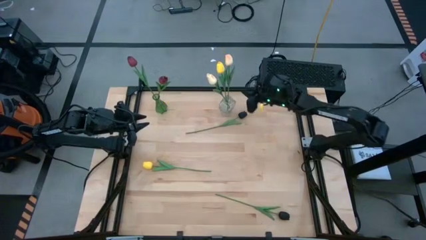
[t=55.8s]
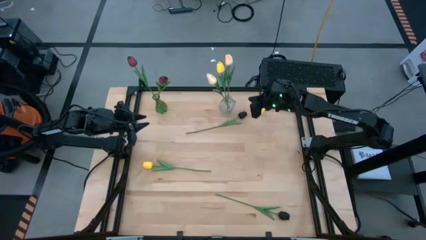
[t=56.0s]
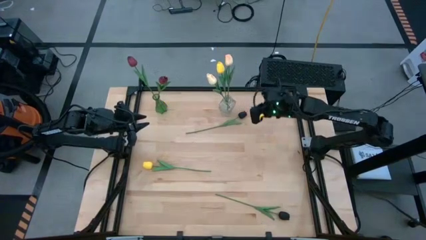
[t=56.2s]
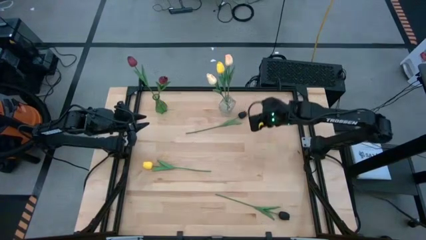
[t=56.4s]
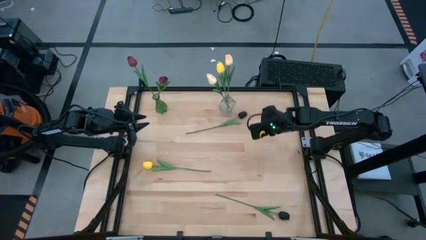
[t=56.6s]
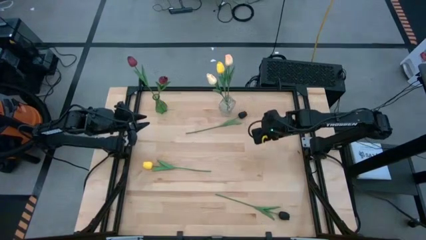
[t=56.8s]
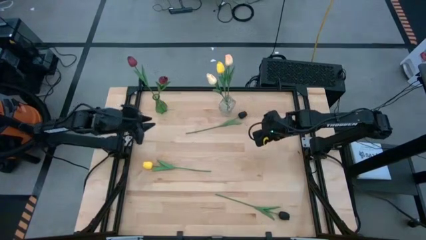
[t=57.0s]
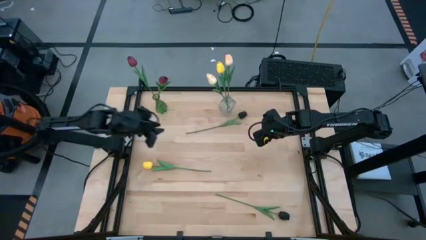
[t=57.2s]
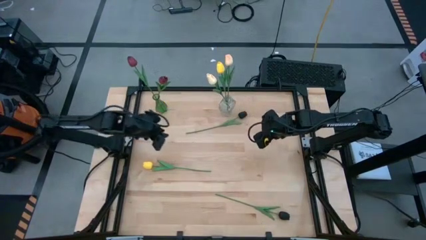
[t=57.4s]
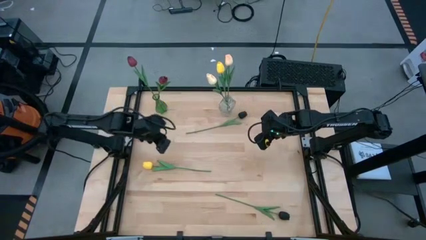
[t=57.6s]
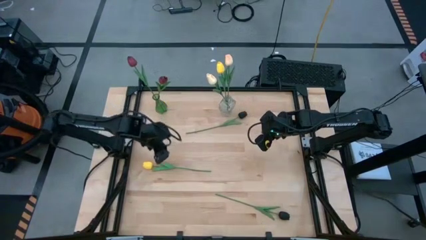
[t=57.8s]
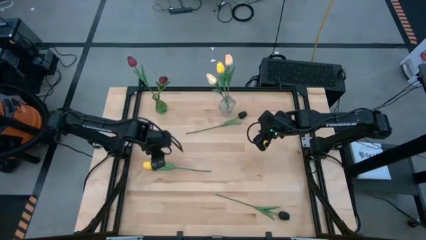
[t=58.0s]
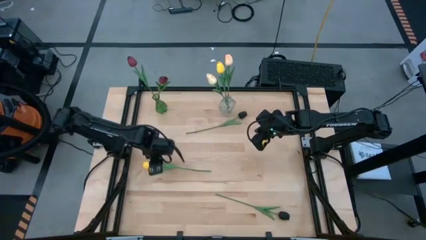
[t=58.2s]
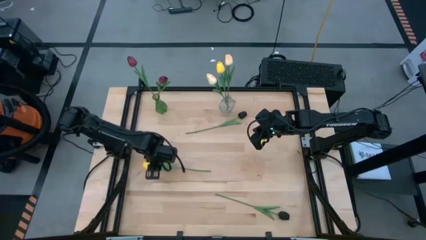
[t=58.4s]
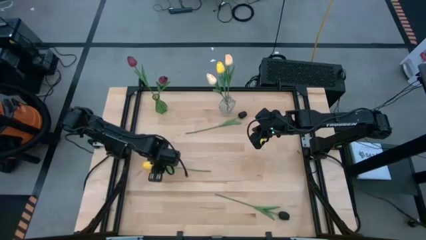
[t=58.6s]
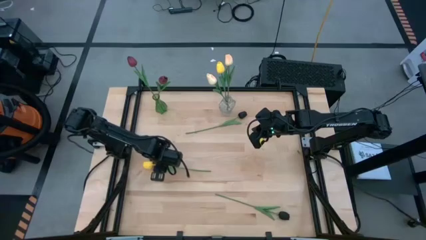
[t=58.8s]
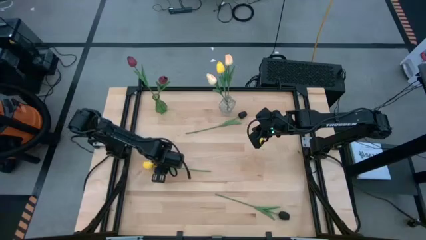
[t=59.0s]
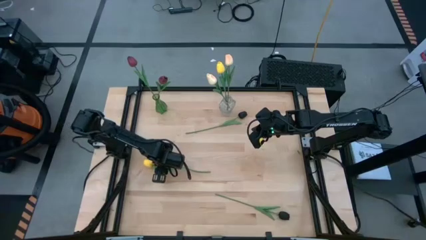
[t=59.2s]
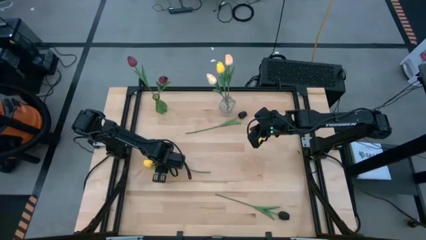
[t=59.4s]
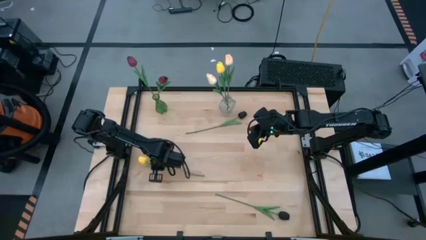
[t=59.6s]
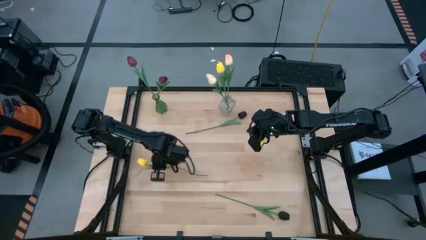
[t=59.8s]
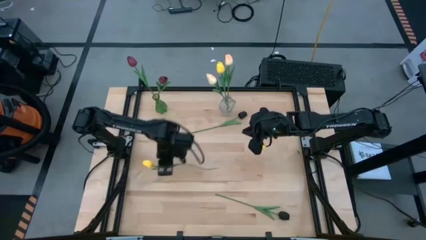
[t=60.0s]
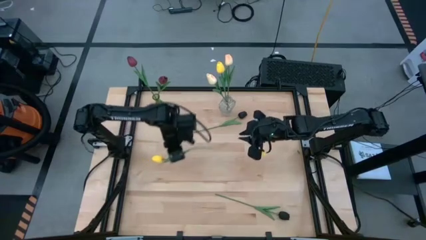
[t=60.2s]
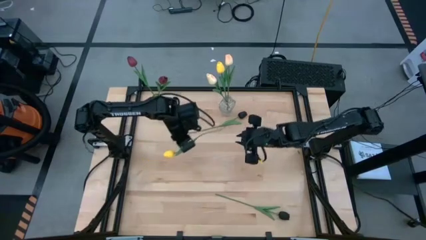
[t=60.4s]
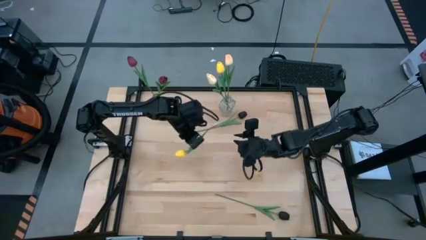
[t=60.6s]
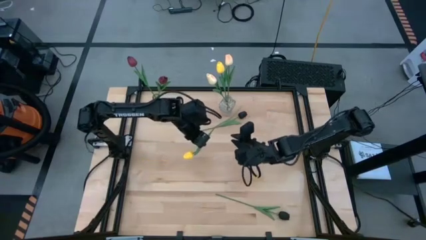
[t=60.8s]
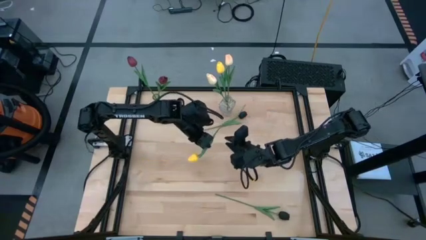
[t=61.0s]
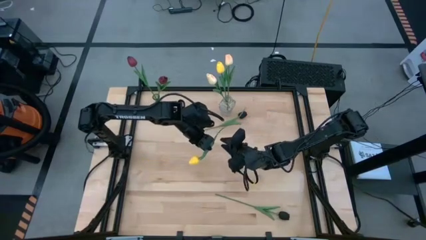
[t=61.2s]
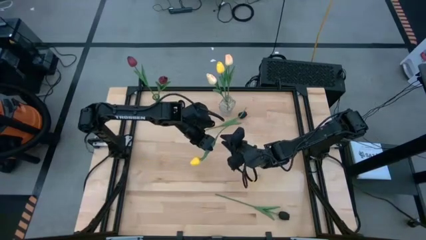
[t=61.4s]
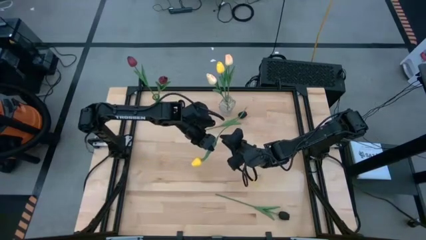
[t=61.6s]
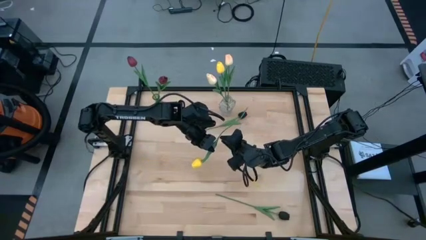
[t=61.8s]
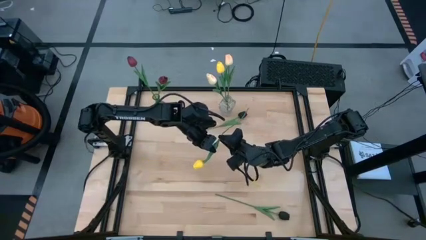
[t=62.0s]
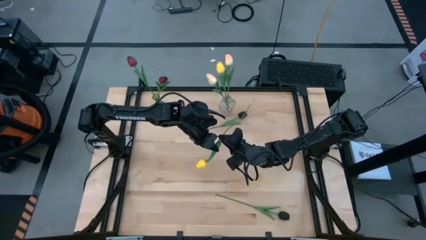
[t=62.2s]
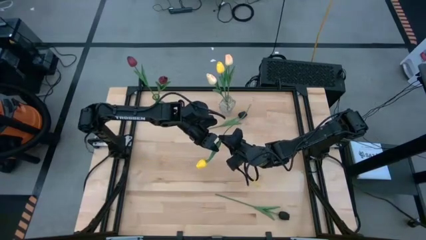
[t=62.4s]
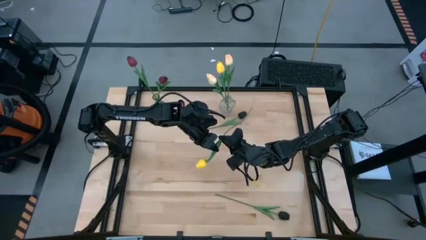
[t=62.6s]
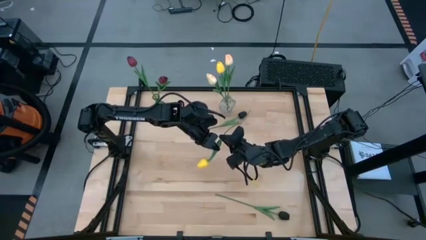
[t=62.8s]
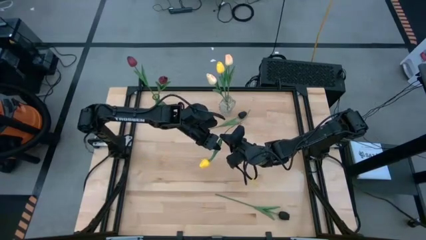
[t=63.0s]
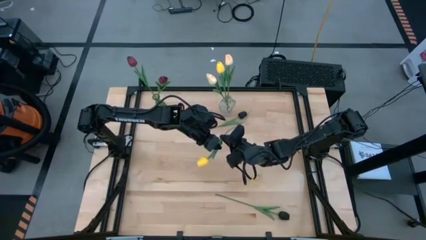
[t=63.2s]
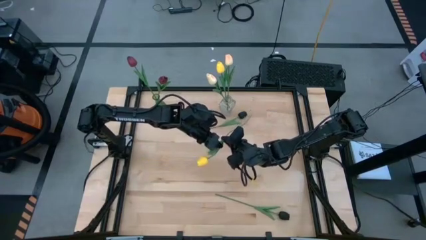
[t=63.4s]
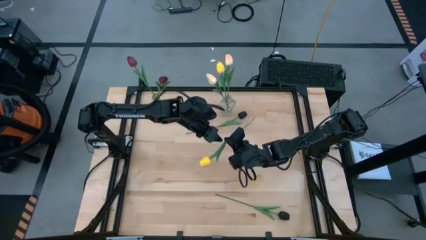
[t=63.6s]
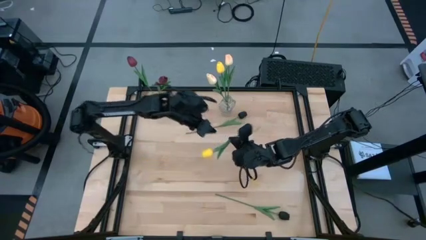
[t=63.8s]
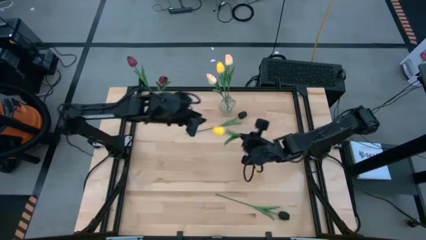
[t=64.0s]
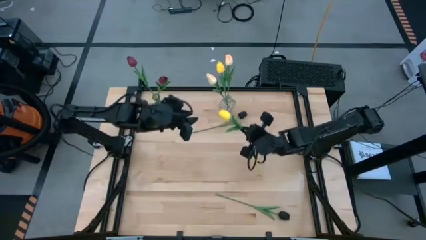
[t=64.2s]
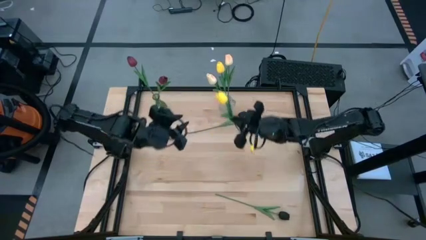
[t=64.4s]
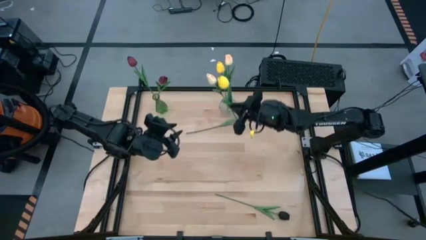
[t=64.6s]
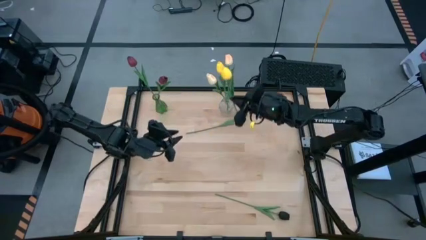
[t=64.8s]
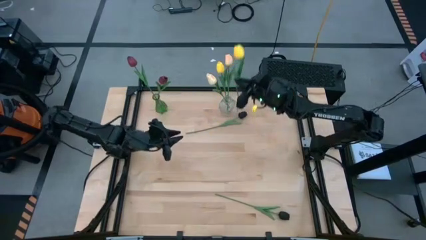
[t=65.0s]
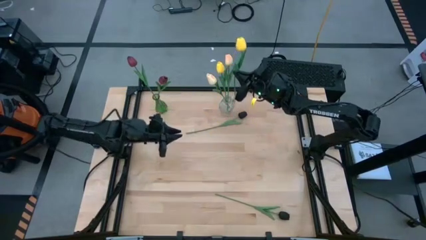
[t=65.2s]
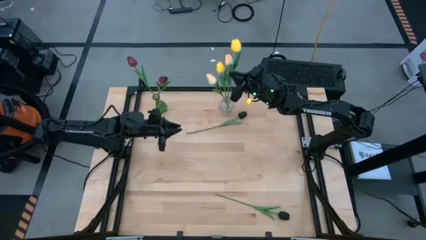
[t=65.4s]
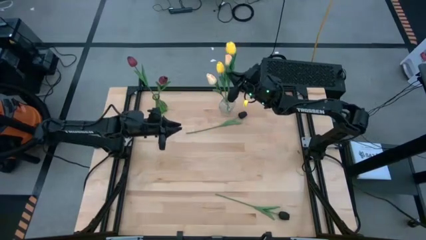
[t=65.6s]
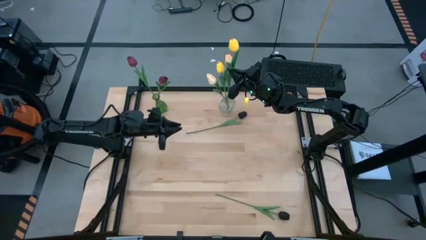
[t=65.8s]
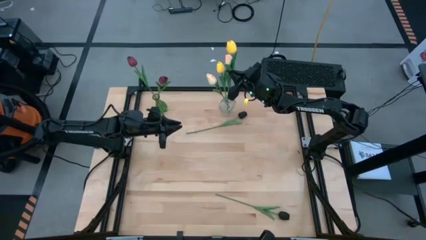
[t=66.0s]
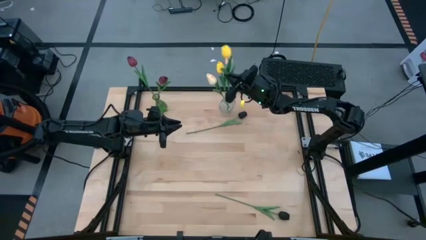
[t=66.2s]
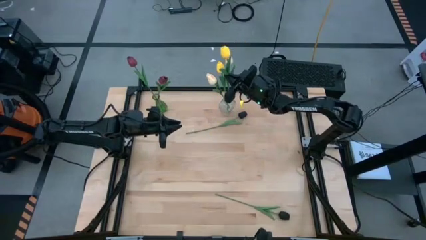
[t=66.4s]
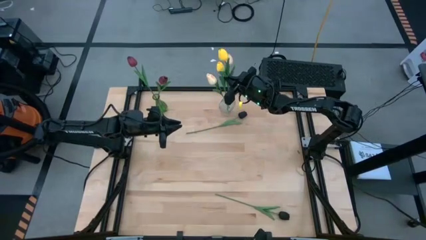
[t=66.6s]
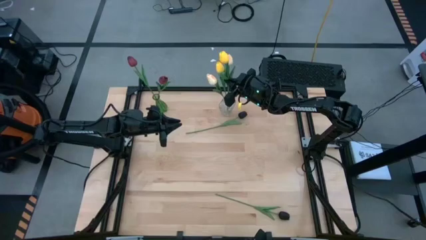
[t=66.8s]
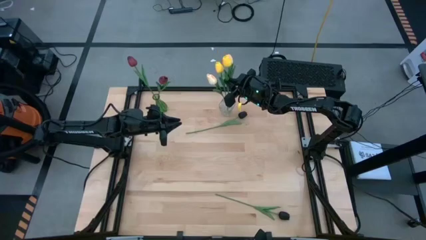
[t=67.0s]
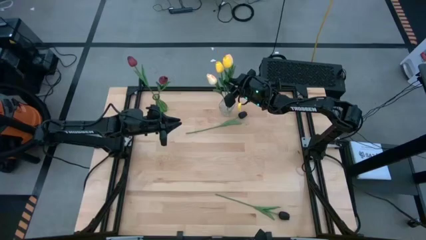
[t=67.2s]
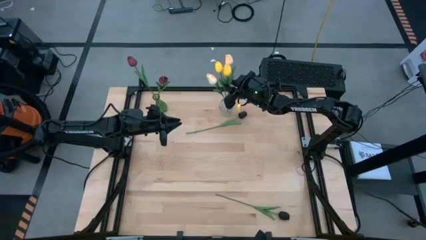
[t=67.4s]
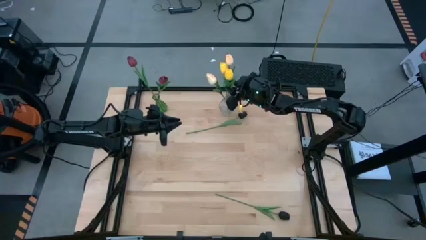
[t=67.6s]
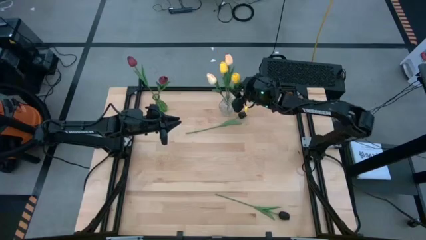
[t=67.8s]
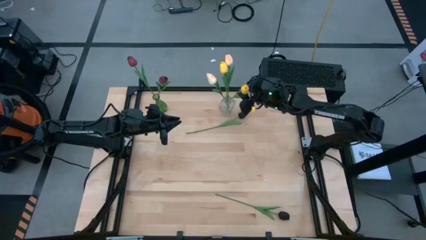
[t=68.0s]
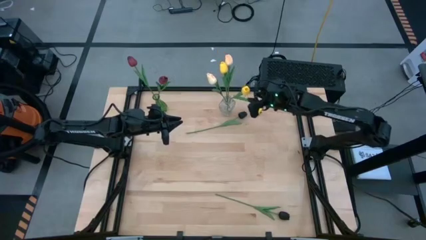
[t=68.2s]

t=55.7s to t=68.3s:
Task: Sort flowers into vase by color
Put the yellow tulip into the transparent vase

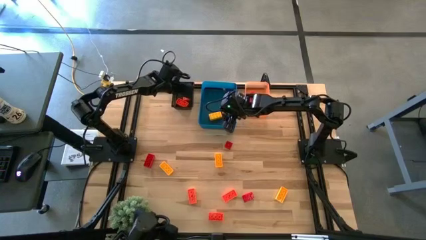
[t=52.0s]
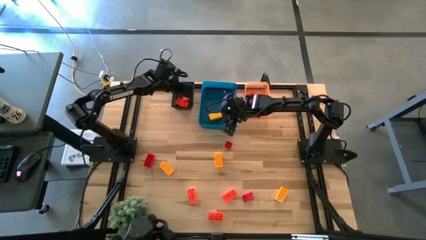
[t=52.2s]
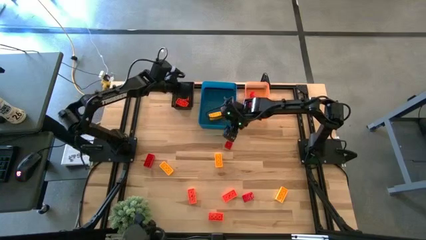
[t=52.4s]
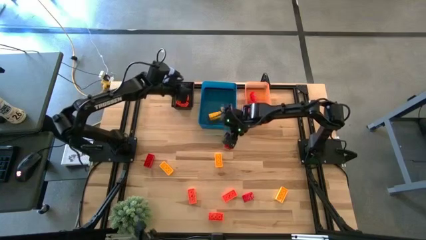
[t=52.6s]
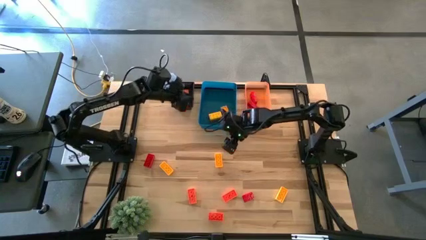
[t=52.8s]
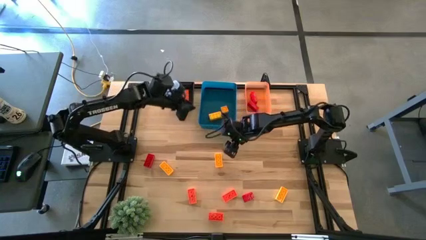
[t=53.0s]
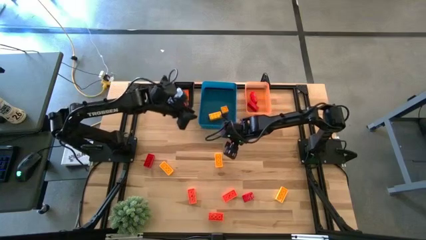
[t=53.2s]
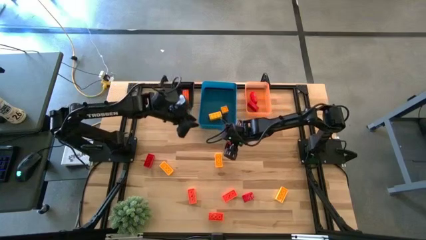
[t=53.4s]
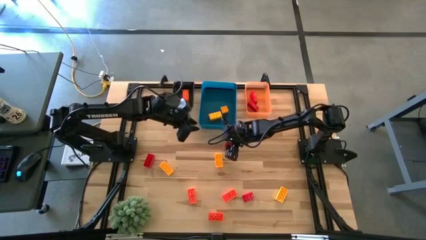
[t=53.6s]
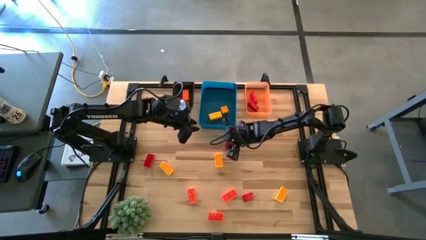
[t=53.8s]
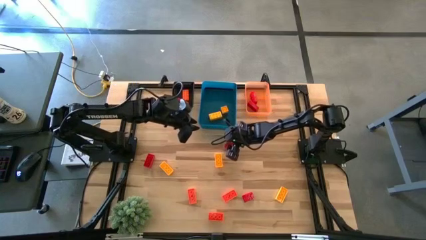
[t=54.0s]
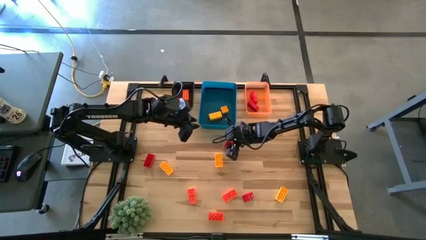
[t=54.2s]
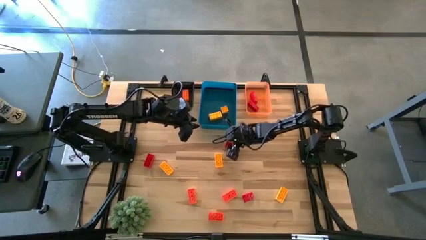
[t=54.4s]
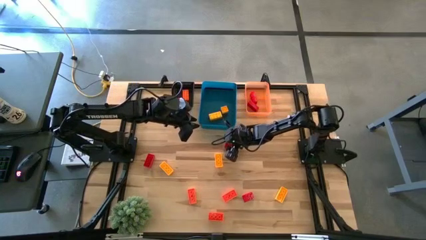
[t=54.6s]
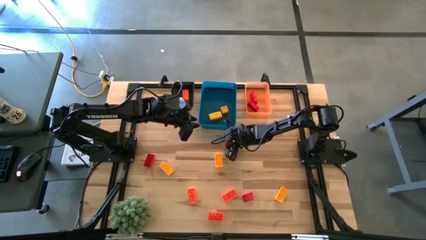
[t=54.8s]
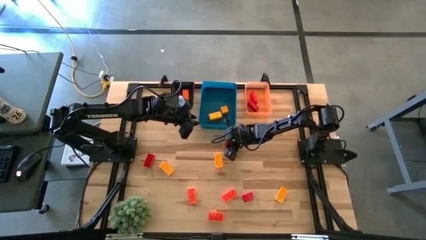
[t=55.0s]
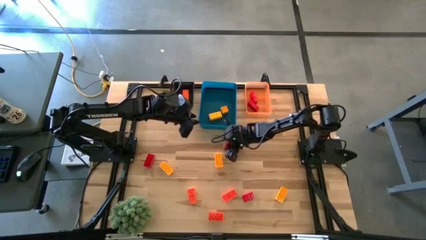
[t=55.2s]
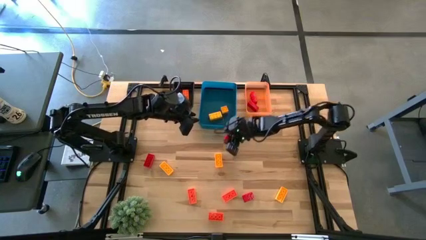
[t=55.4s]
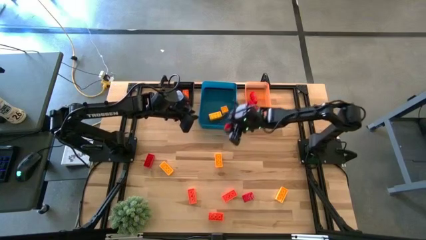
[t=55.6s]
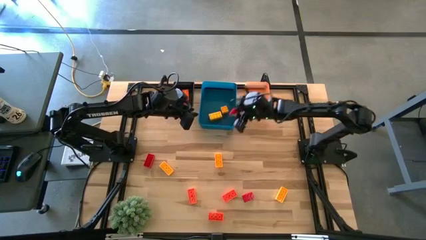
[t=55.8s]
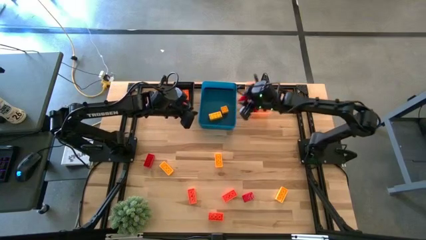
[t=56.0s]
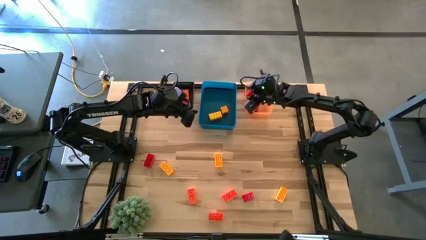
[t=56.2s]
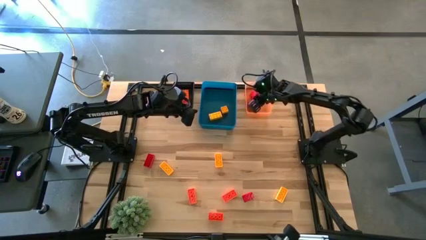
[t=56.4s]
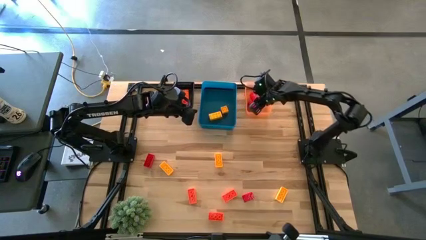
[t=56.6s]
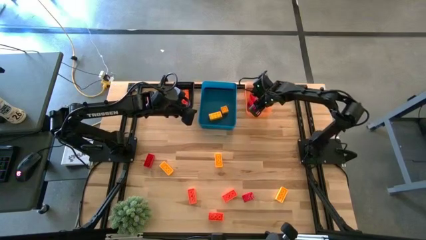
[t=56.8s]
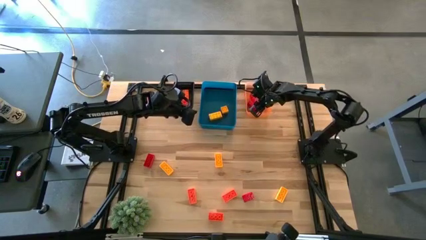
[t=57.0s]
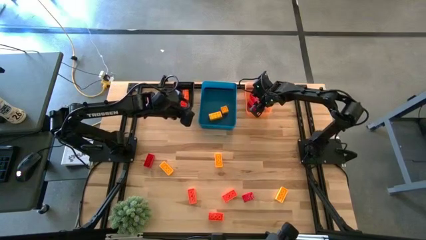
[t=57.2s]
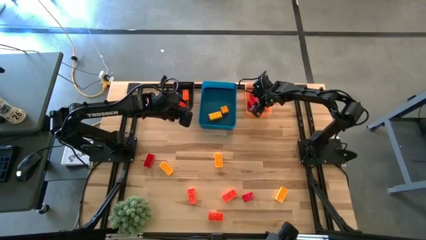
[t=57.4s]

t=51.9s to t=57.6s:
Task: Sort & place blocks by color
Put the red game piece into the orange bin
